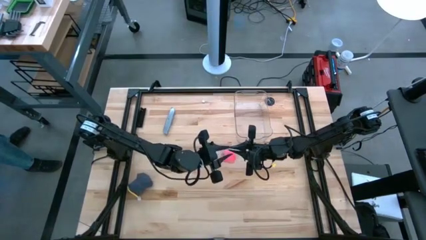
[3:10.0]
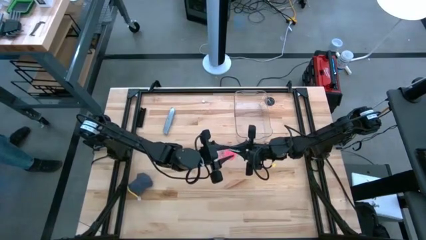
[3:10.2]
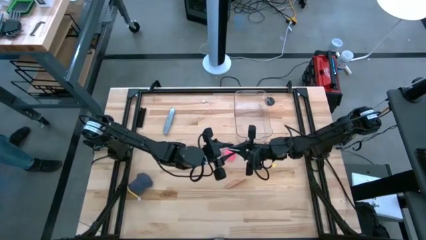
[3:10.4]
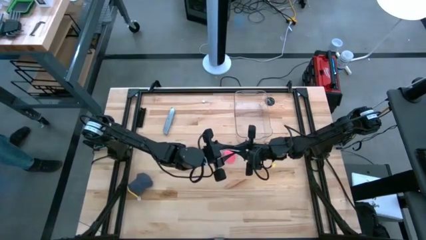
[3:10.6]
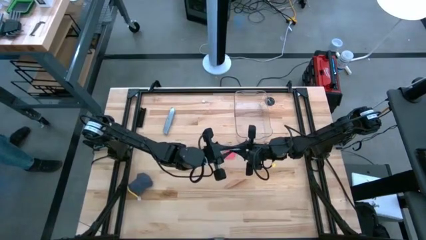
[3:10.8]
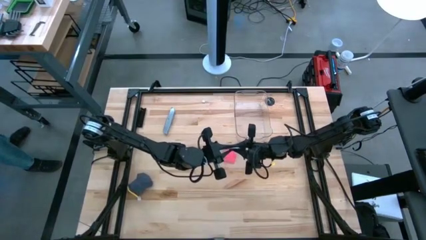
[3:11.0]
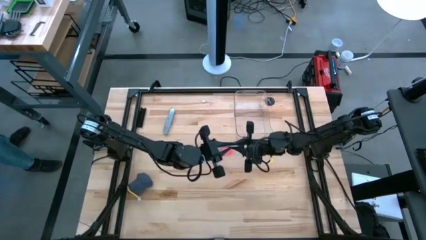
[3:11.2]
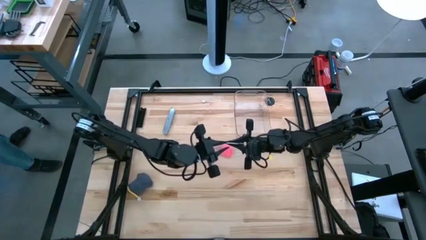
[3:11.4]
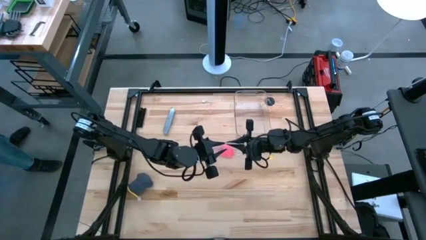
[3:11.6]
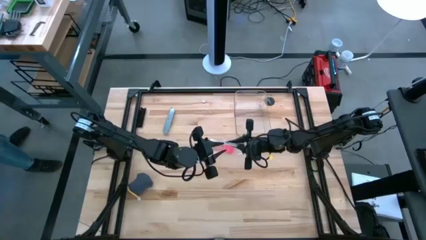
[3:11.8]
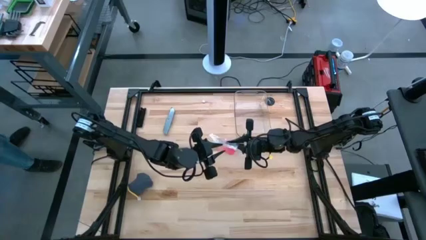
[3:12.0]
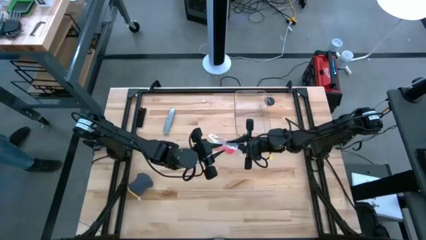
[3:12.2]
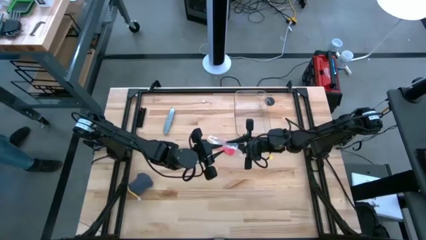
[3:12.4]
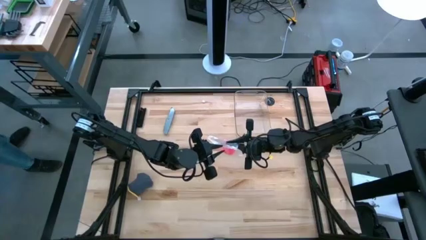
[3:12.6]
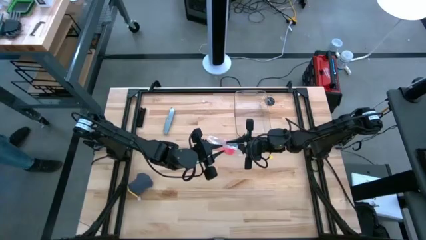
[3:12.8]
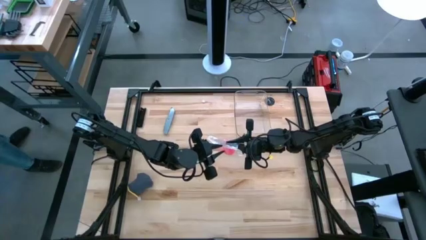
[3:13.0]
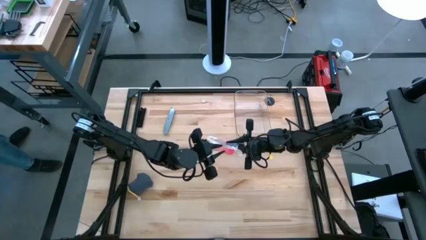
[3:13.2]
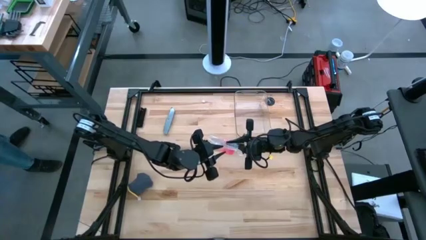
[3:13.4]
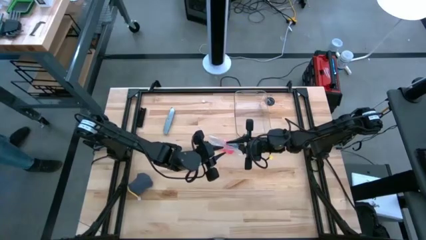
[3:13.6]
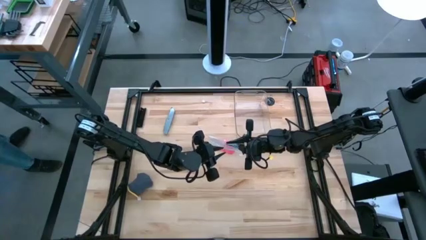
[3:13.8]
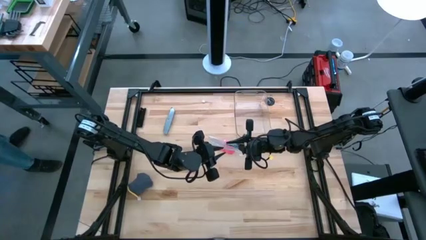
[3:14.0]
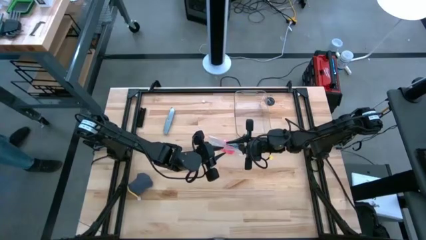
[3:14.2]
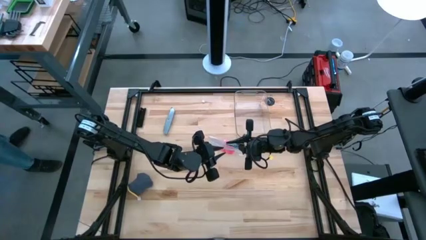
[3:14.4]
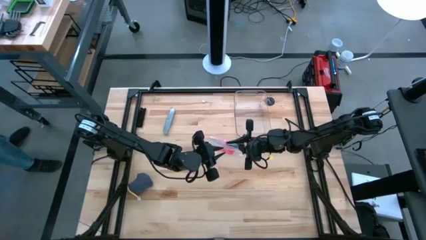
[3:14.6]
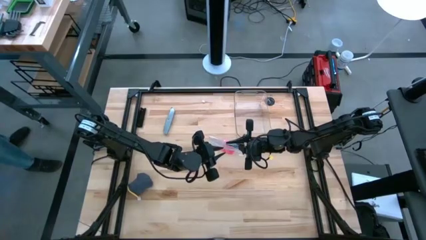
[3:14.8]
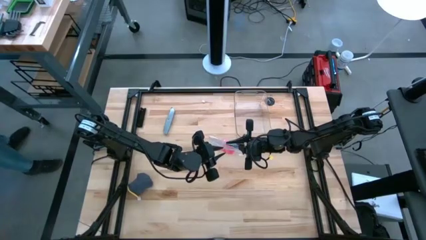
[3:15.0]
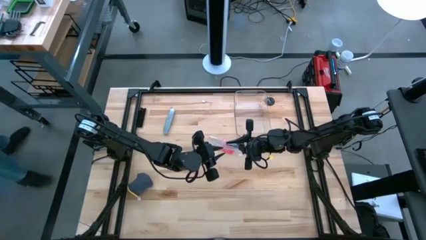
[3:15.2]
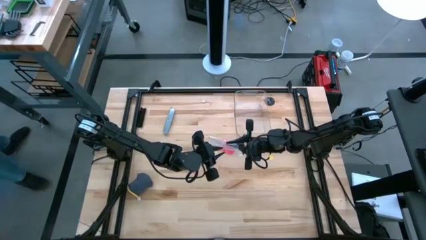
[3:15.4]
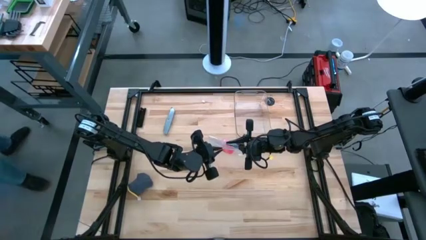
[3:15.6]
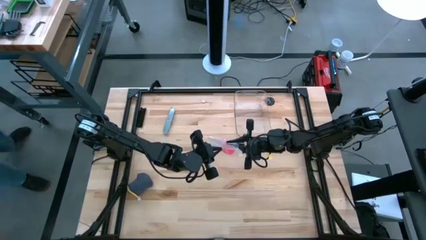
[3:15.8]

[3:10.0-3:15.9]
Task: Roll bandage
Close the transparent zip bag

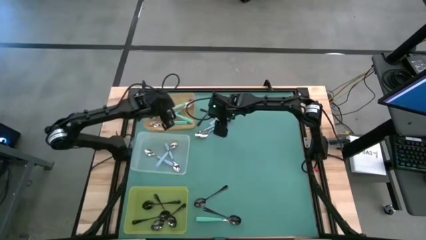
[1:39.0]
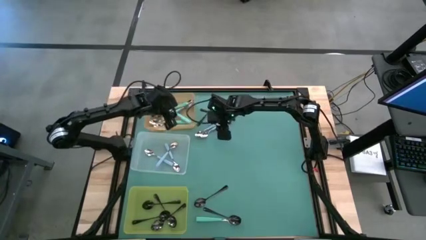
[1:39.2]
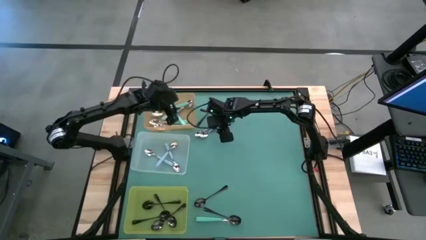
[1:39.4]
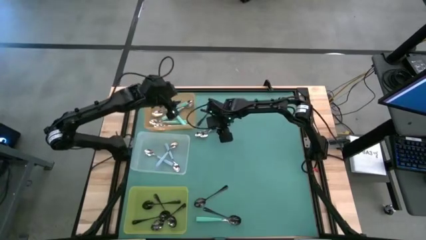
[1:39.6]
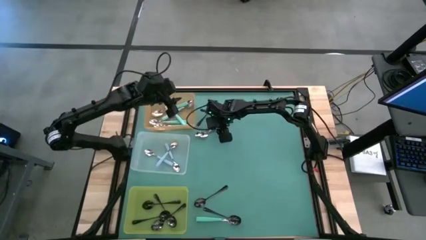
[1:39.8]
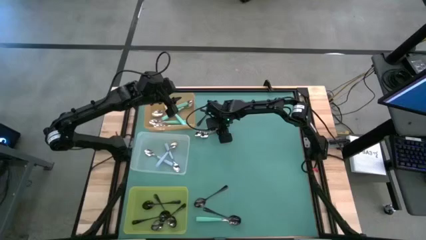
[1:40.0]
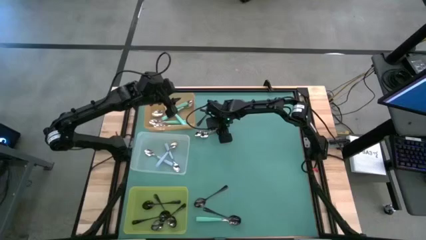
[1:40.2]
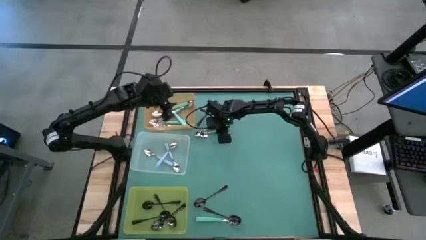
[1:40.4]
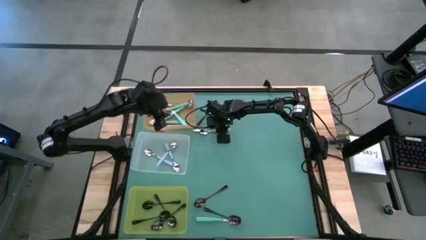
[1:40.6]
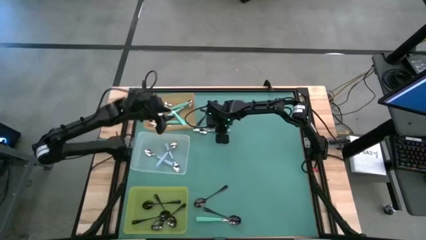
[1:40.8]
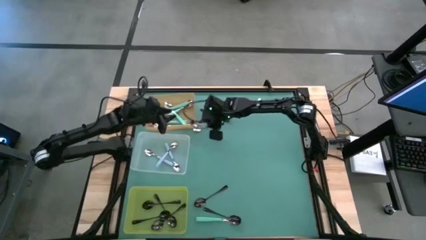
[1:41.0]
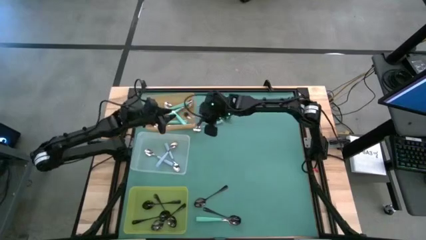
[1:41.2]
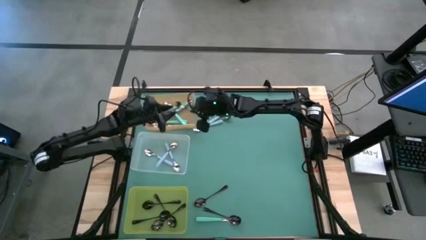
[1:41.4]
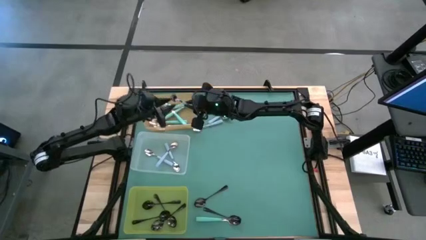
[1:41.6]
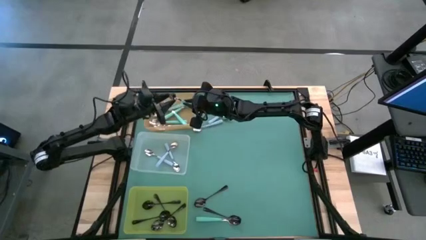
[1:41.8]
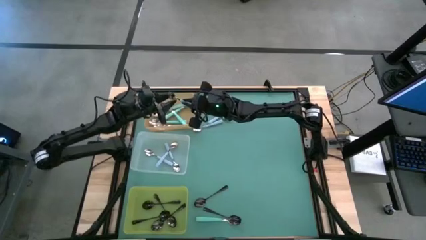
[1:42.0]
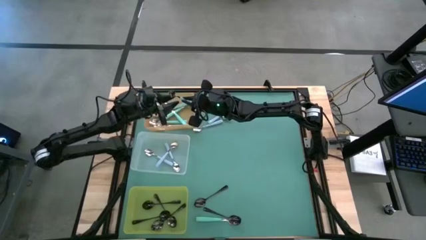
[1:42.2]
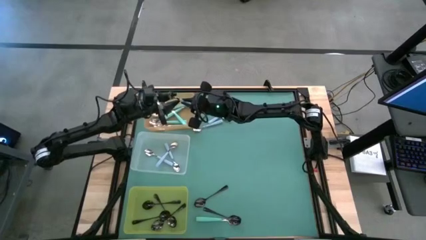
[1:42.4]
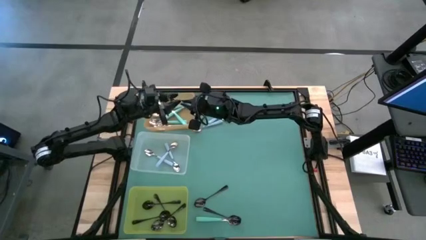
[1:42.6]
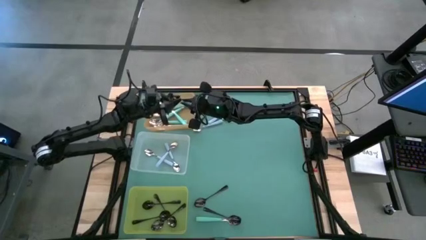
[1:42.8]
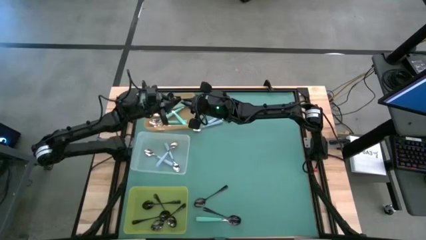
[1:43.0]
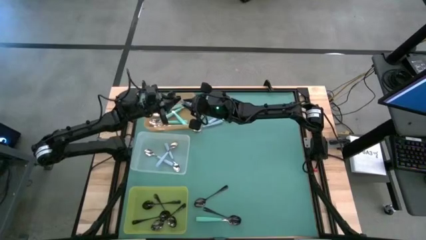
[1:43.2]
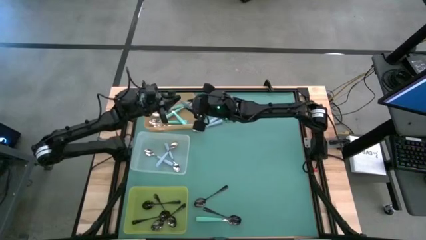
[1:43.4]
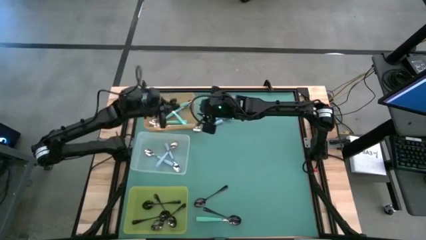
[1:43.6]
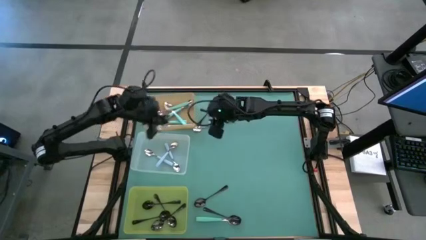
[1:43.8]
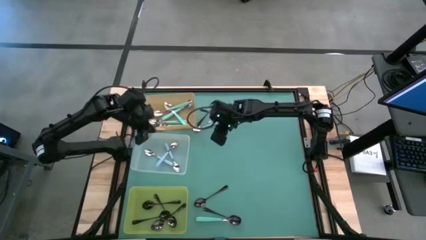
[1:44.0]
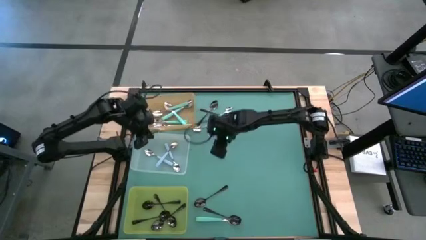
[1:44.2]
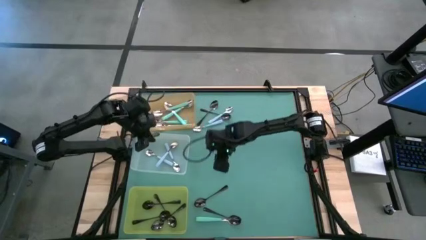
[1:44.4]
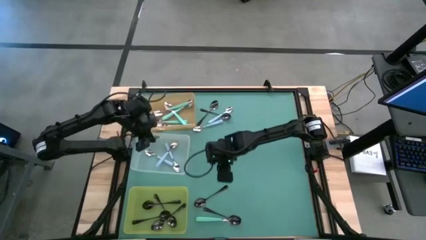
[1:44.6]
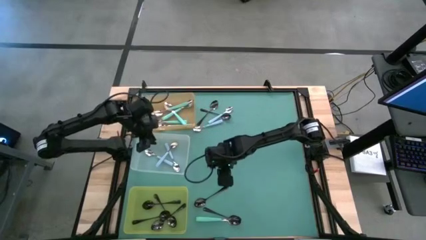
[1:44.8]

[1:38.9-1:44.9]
Task: Sort silverware by color (type)
Put the blue spoon into the transparent bin
